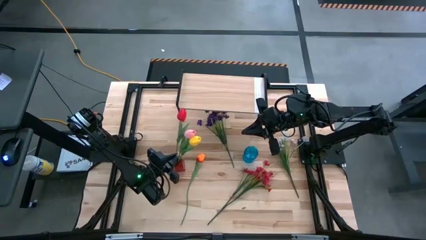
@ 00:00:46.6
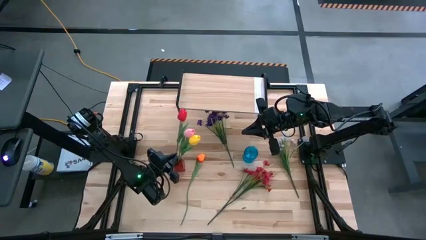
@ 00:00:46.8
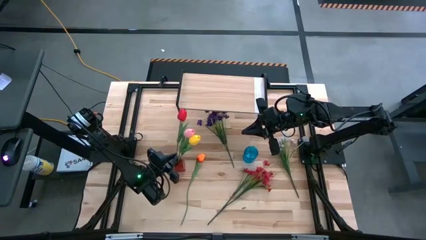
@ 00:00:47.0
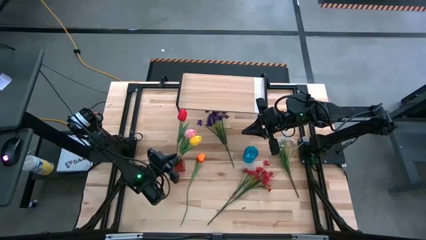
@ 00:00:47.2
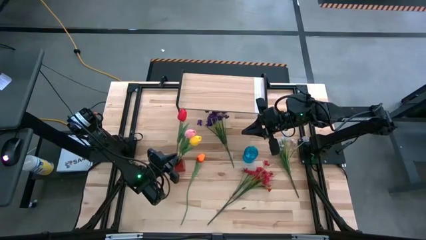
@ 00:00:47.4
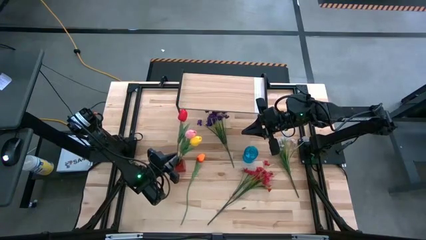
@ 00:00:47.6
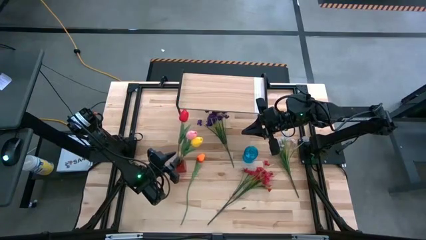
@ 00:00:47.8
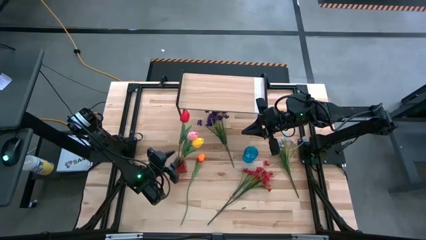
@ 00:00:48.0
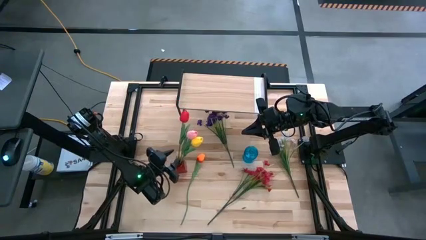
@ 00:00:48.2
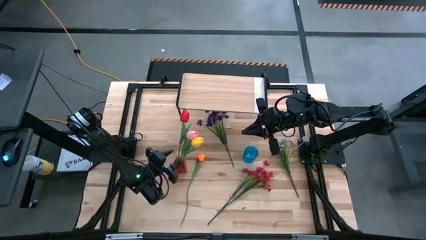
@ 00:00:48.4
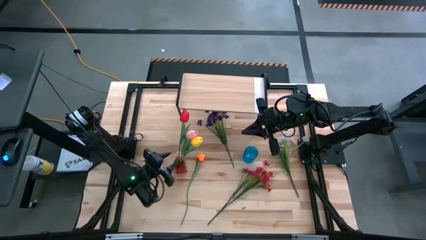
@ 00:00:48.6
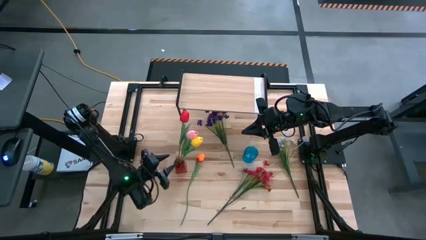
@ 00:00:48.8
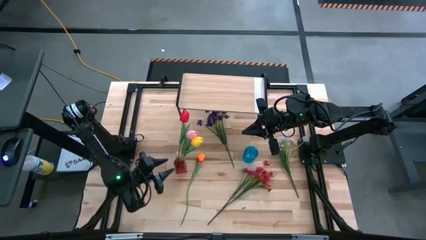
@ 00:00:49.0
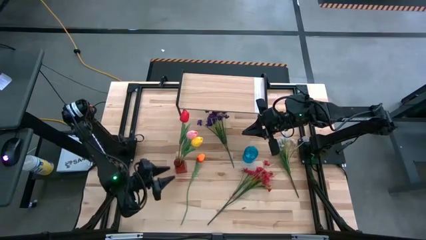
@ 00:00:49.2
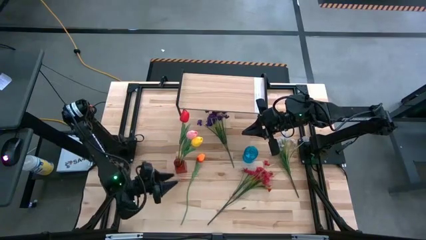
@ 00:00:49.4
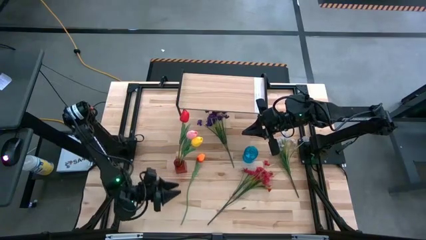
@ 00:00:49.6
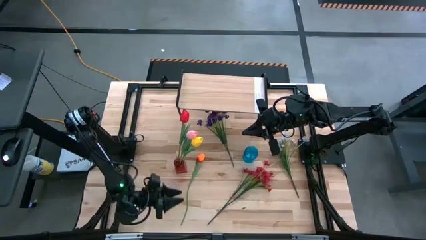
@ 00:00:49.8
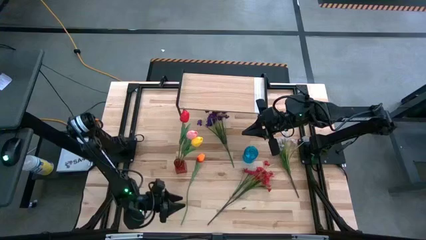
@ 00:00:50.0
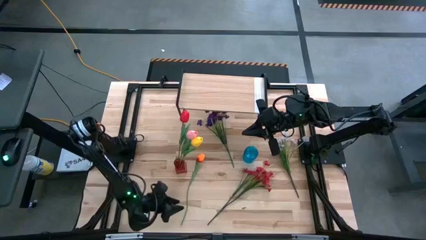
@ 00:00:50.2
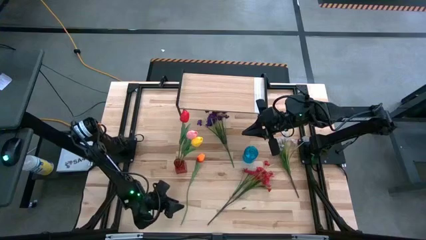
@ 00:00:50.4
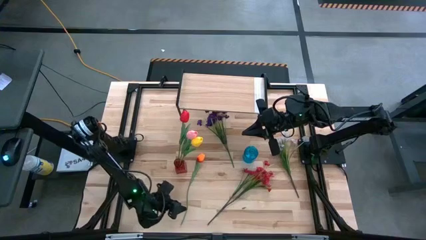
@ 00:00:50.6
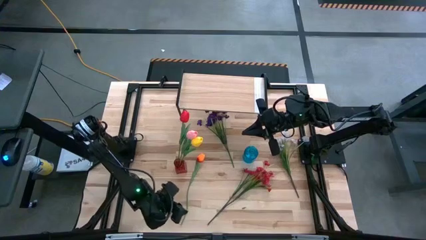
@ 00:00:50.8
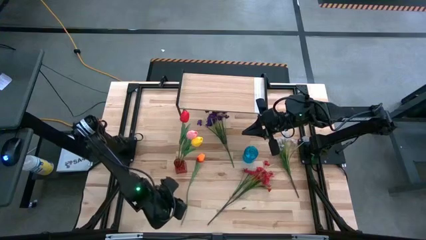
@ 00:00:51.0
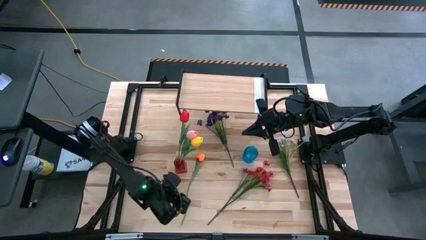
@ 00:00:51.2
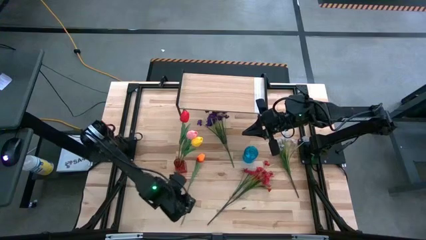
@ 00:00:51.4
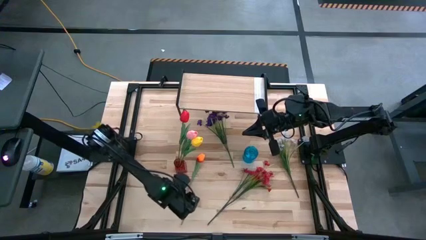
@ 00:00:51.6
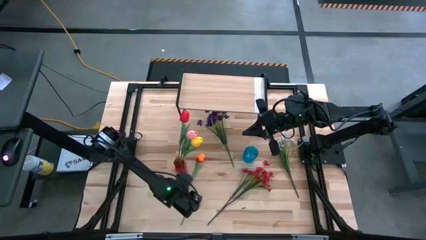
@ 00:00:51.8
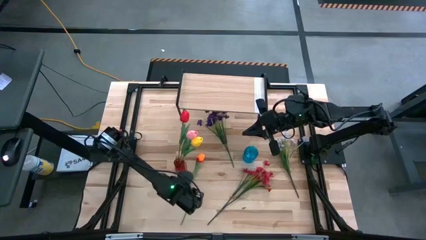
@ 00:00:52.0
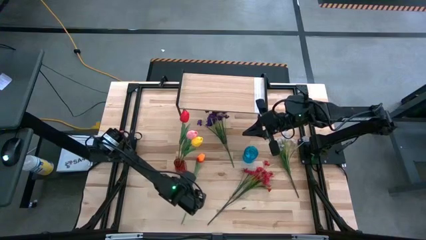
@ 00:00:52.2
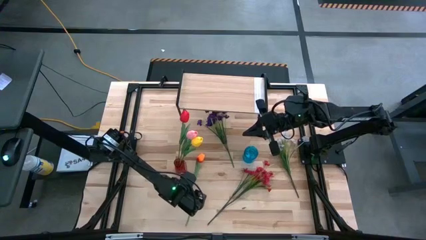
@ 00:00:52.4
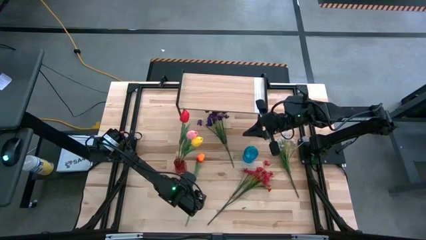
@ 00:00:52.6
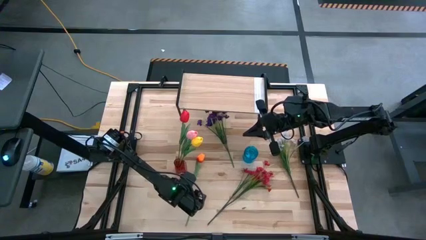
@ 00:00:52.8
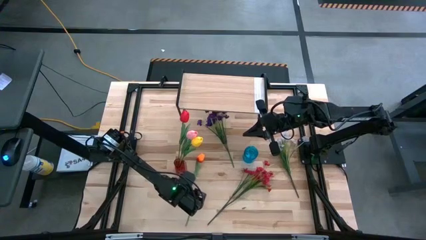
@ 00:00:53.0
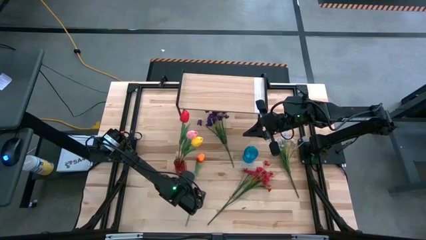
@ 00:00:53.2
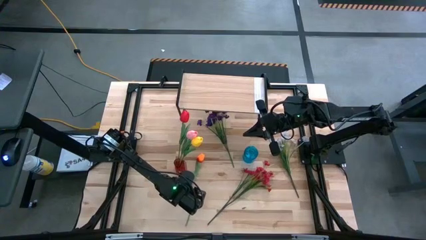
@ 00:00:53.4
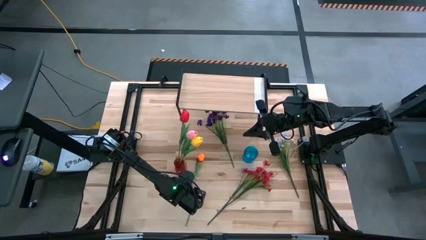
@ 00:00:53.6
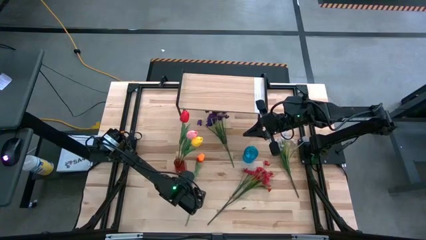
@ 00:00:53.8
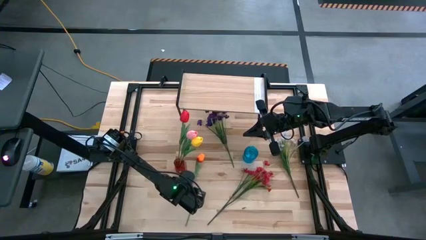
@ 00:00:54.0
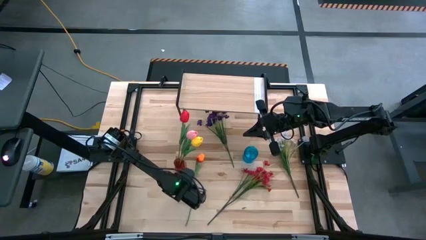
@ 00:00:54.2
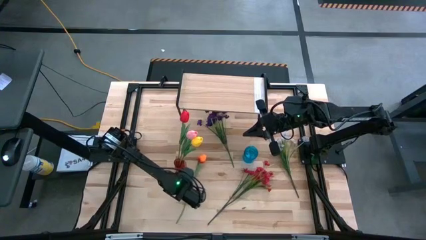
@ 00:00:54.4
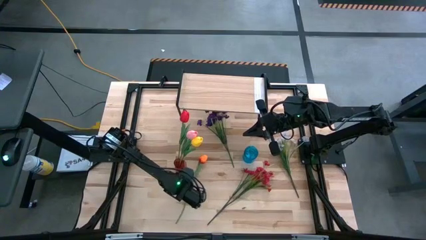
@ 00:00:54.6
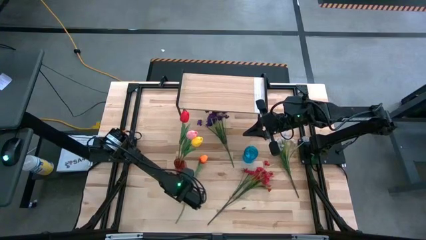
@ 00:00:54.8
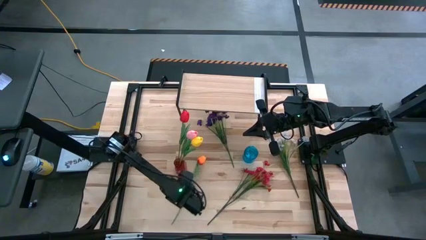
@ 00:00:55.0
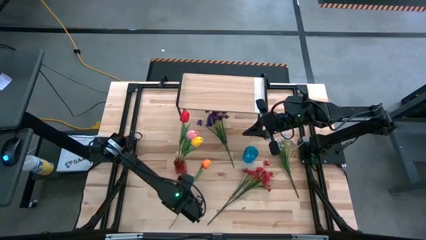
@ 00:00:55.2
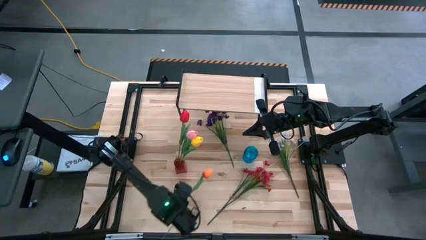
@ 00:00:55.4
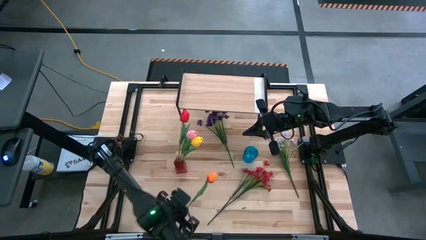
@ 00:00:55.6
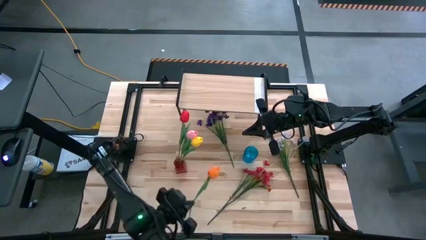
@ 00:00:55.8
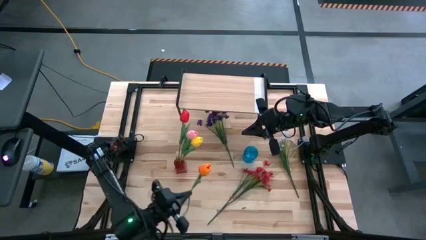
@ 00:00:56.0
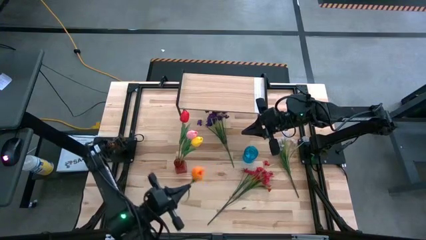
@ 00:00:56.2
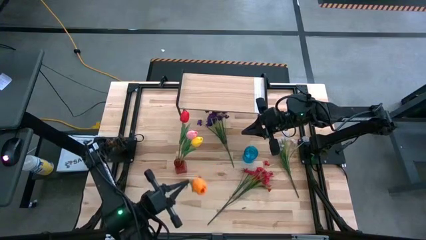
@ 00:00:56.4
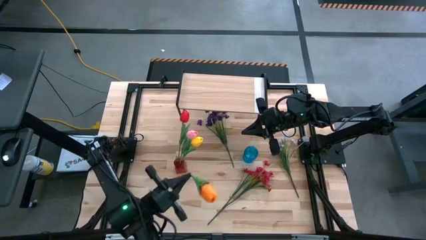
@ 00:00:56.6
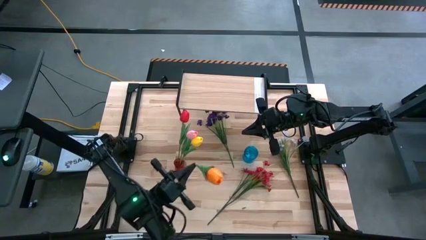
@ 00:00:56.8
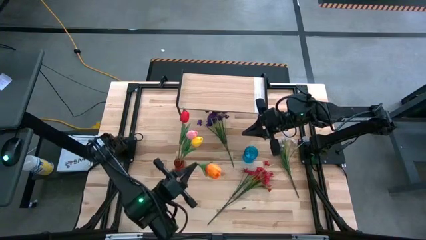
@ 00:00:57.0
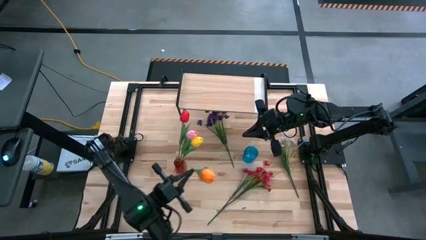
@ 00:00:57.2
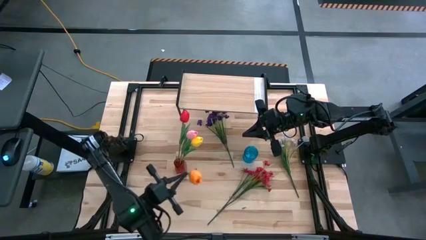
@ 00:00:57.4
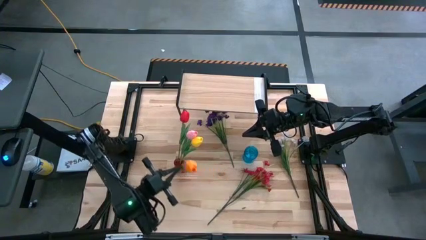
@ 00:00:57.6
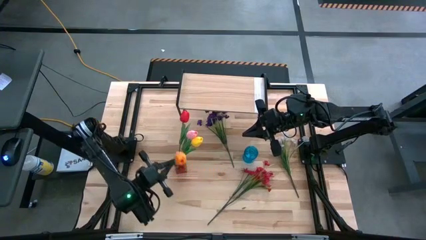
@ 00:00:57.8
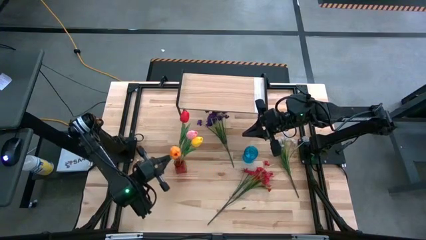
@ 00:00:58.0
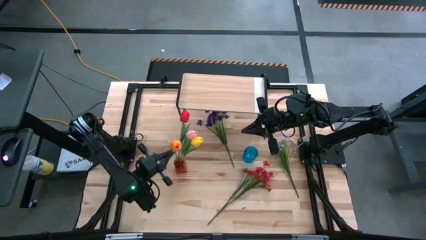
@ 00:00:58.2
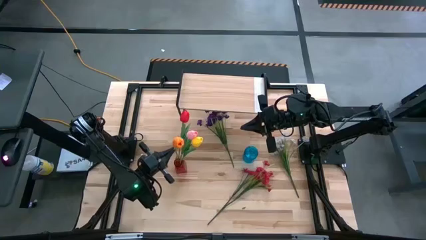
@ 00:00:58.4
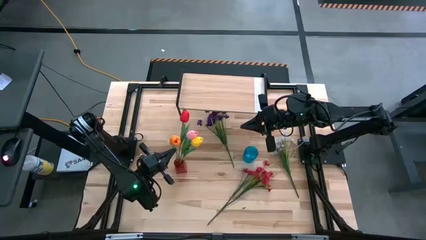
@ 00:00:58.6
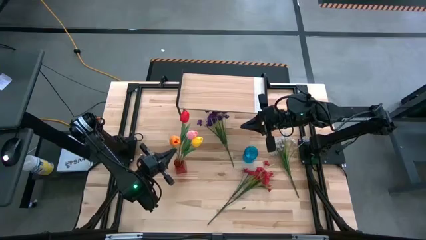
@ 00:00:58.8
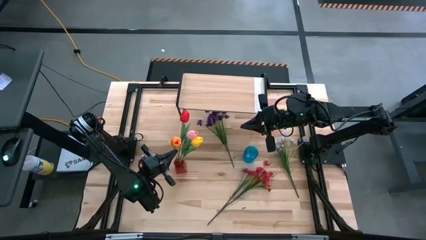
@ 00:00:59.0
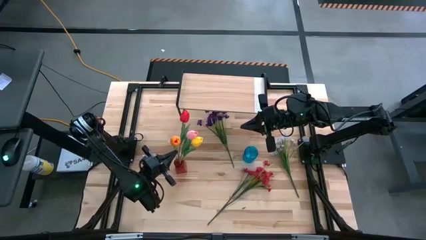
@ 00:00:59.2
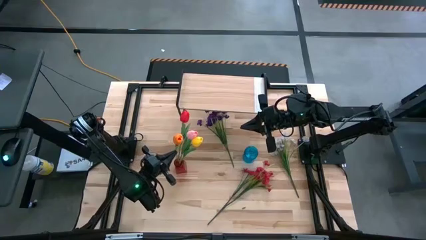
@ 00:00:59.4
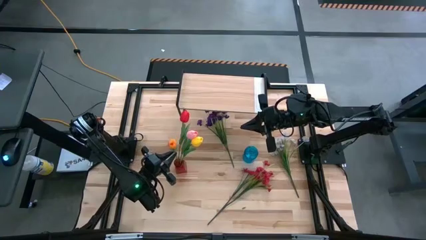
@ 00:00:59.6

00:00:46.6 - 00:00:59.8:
Task: Pick and place flowers into a vace then onto a shelf
Put the orange flower into the red vase

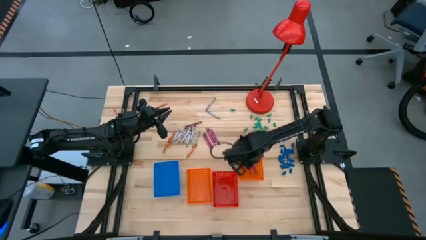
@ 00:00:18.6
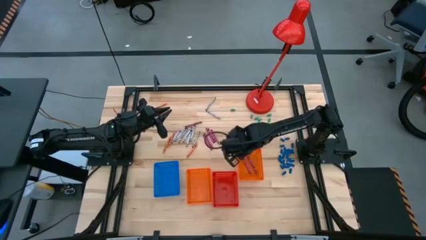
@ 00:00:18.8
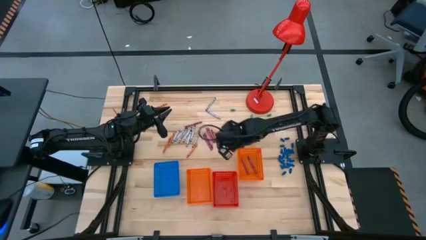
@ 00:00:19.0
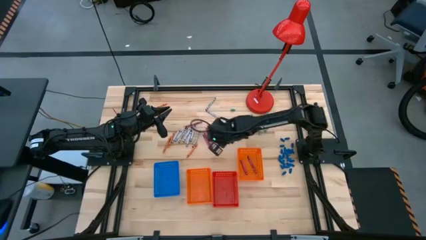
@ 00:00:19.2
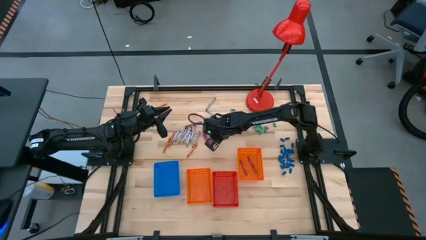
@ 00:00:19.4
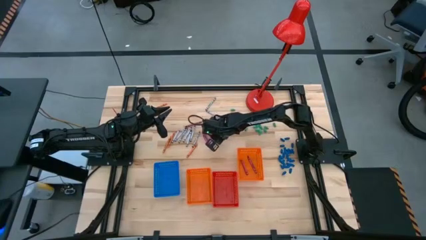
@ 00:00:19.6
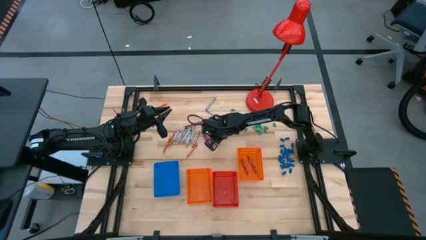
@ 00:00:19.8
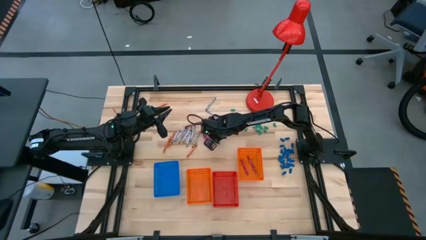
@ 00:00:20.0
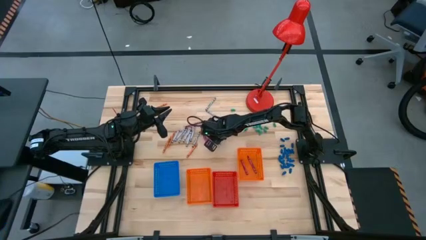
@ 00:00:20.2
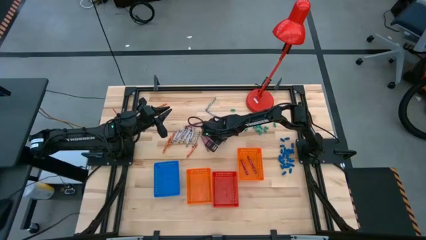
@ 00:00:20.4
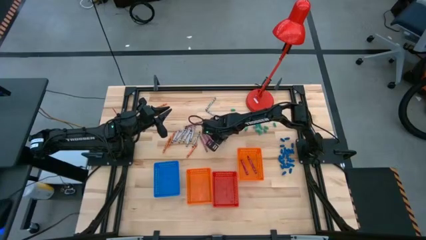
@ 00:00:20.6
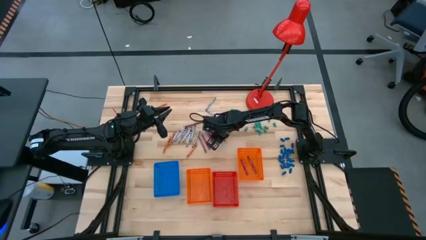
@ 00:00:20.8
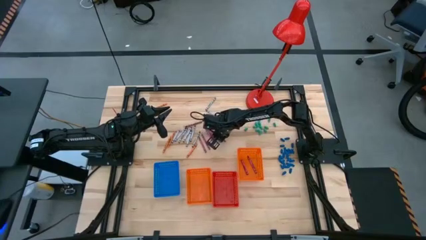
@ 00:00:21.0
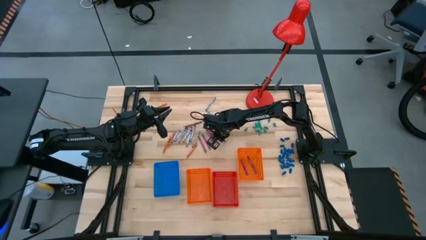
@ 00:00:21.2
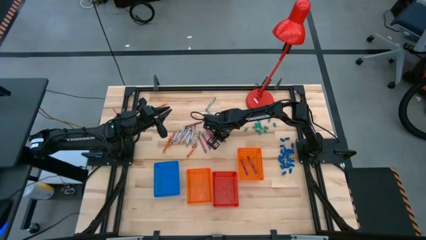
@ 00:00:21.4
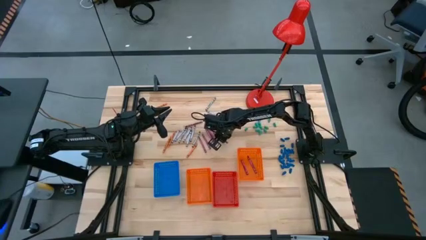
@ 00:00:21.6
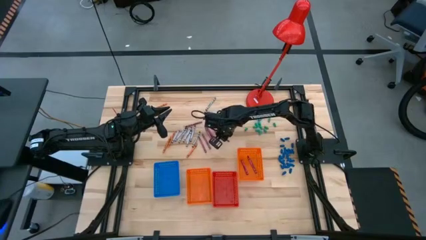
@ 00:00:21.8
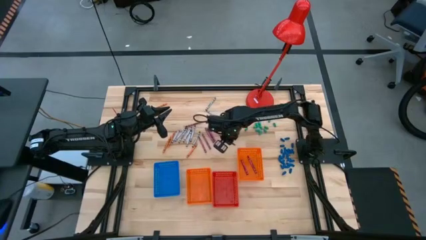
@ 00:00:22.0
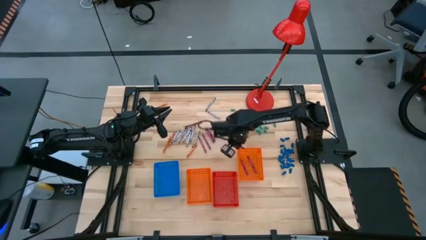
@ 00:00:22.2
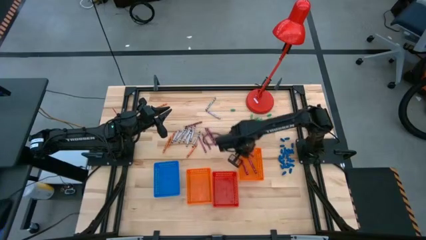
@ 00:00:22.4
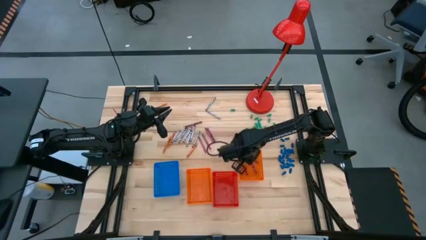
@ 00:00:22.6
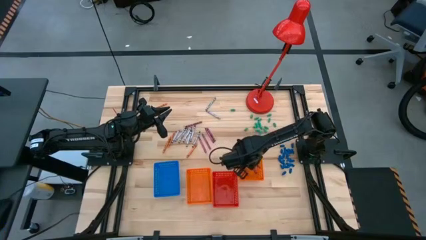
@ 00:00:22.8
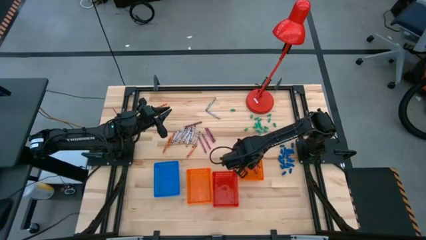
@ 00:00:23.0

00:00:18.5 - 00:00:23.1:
Task: Sort crayons
Put the red crayon into the right orange bin
